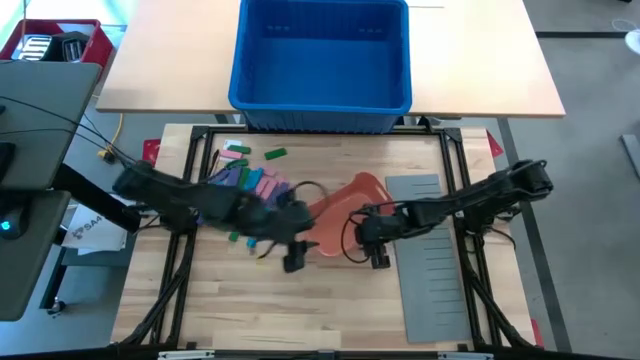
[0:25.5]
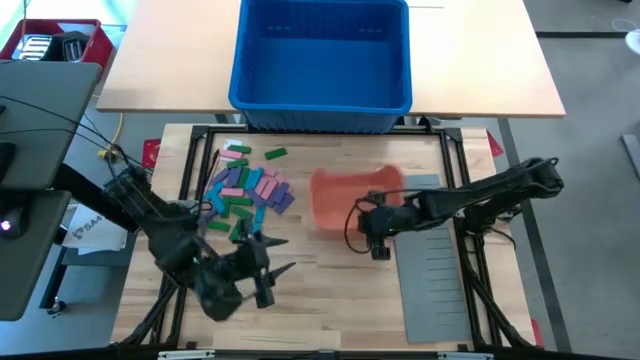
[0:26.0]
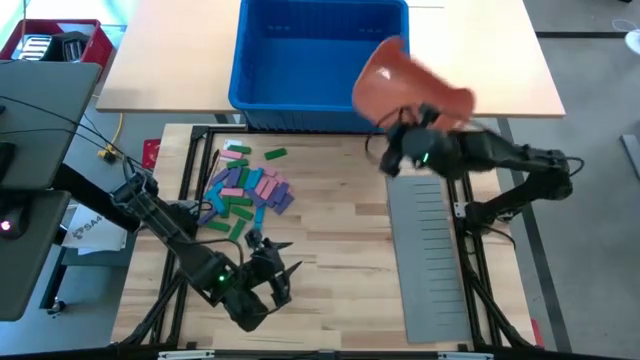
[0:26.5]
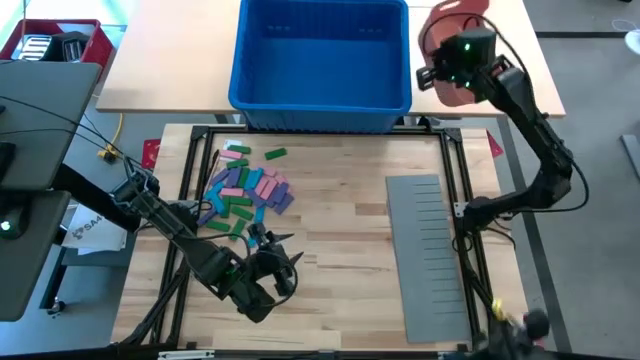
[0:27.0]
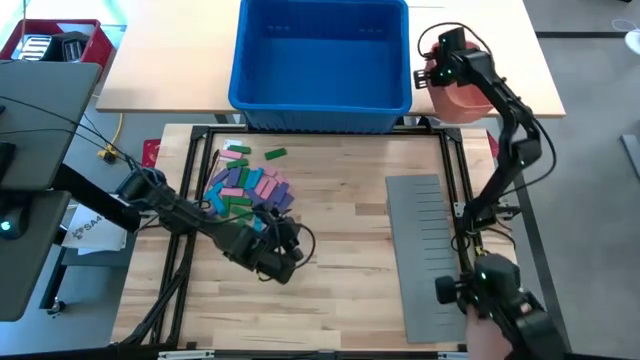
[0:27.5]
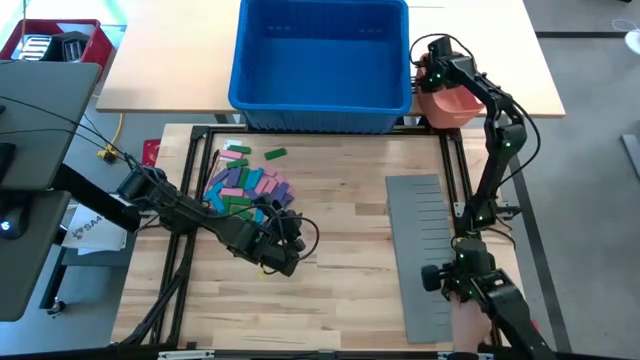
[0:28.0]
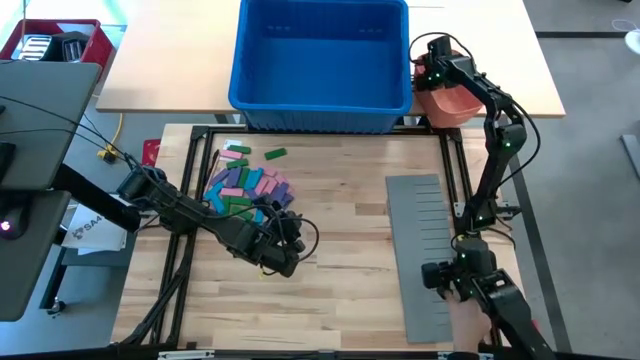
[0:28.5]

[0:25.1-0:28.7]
Task: Sort blocks
Move the orange bin to the other table

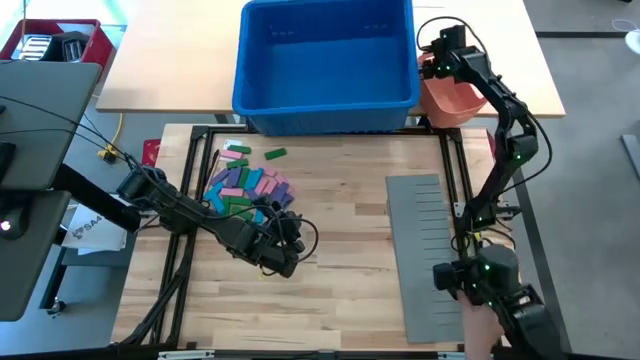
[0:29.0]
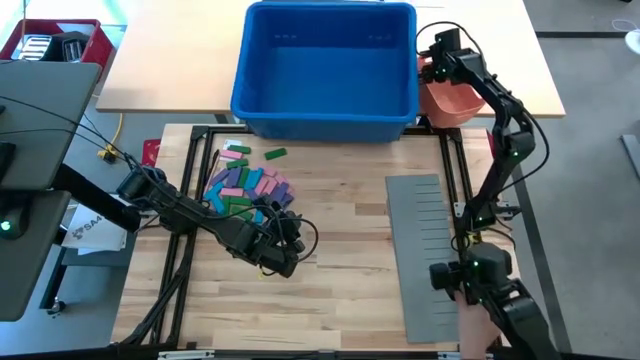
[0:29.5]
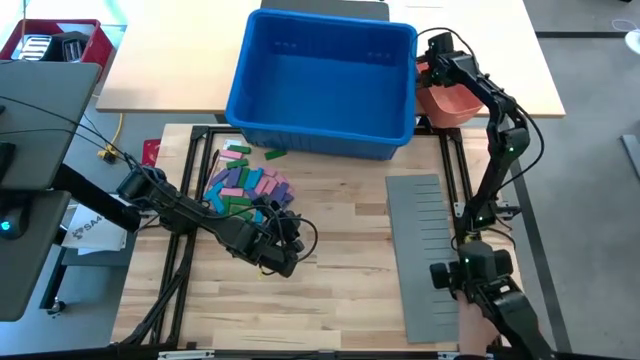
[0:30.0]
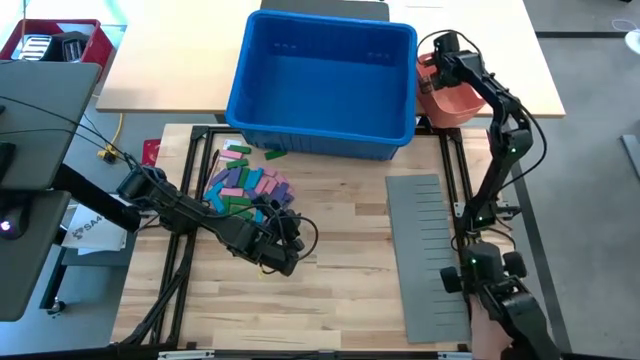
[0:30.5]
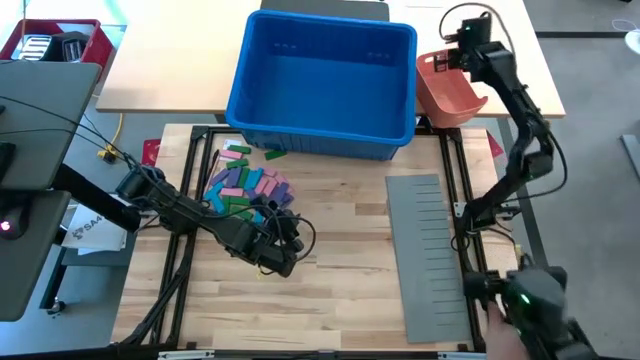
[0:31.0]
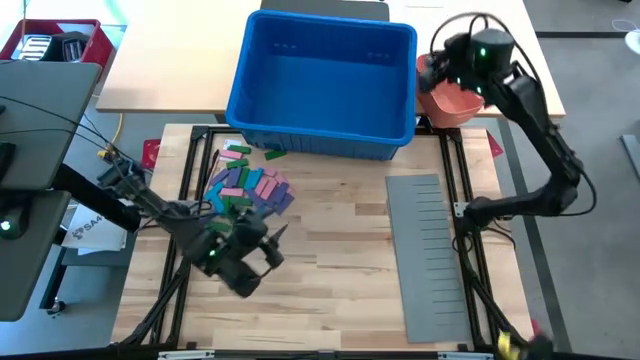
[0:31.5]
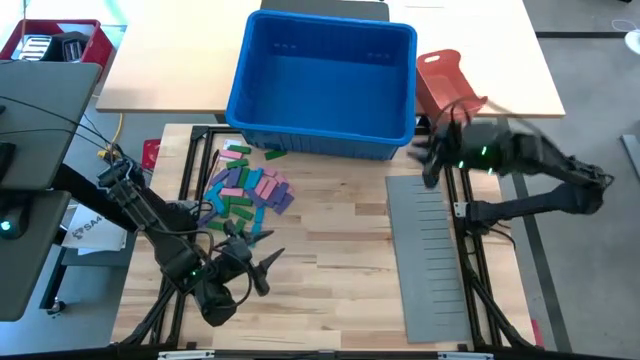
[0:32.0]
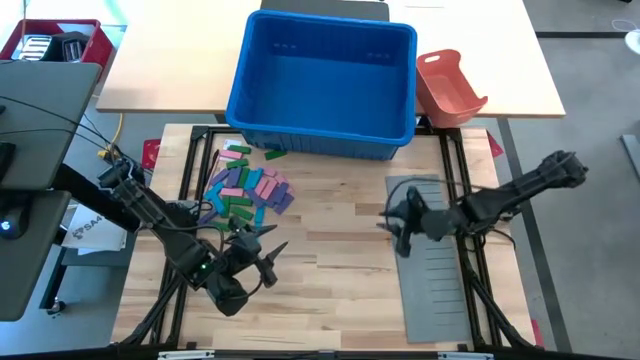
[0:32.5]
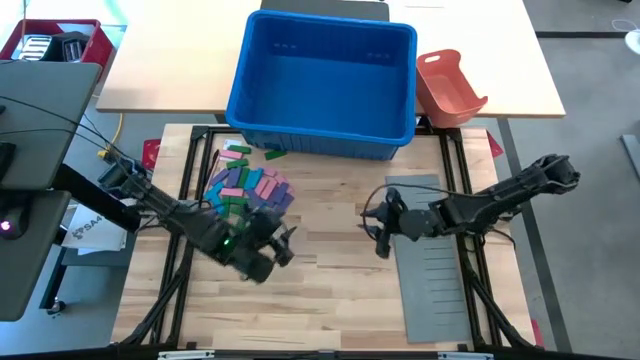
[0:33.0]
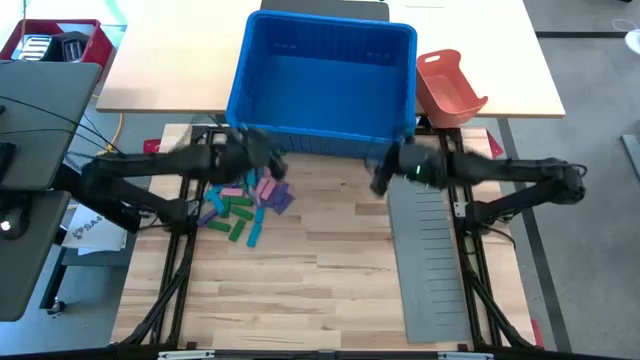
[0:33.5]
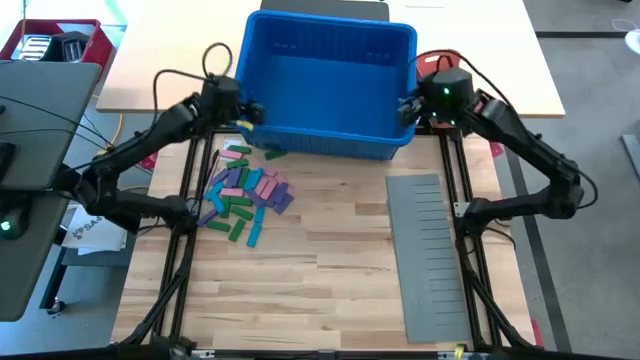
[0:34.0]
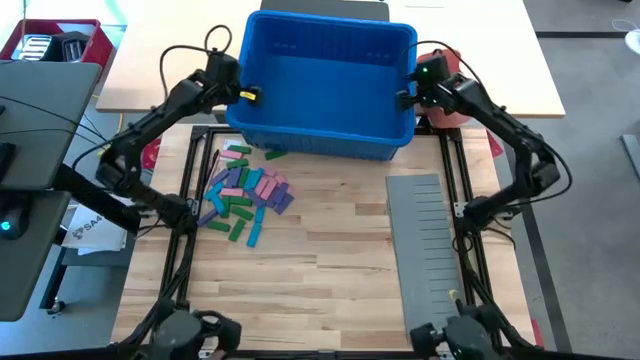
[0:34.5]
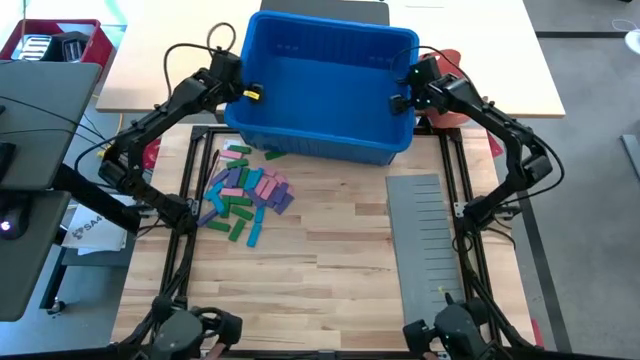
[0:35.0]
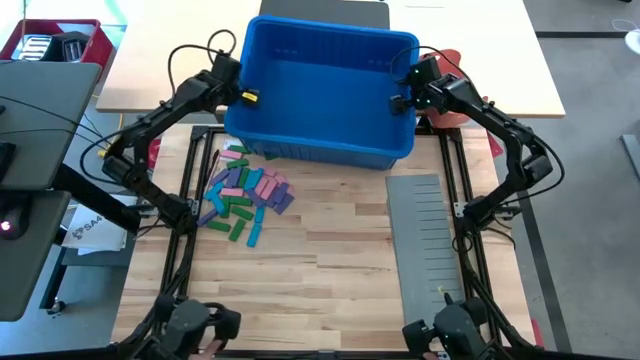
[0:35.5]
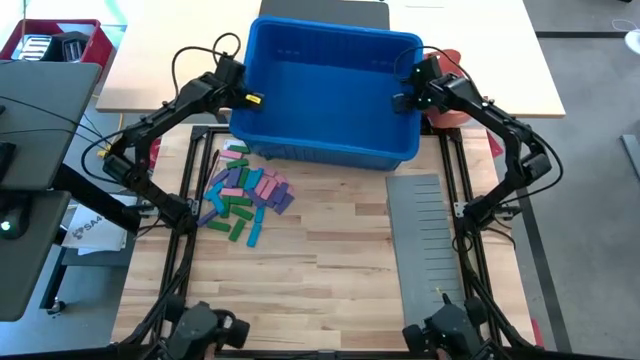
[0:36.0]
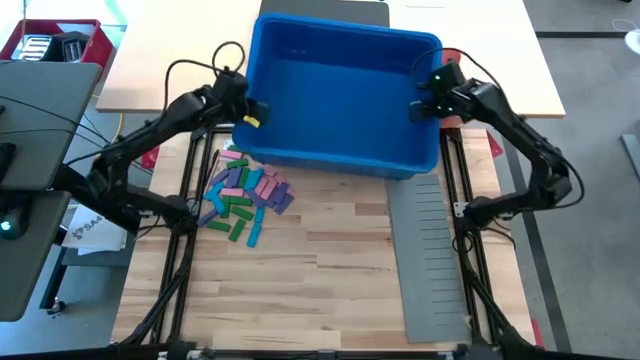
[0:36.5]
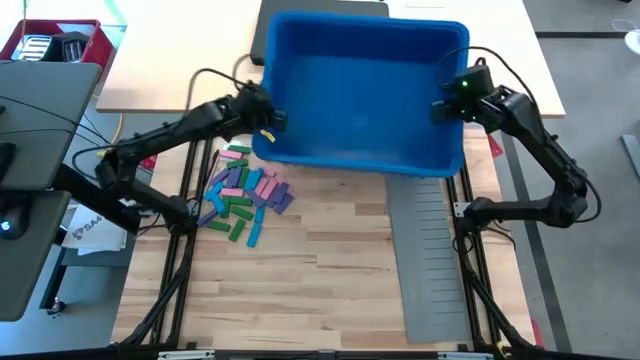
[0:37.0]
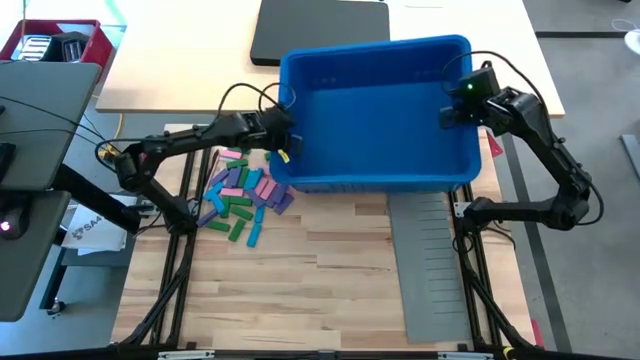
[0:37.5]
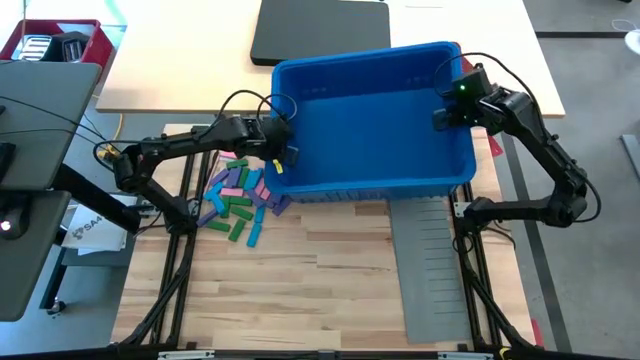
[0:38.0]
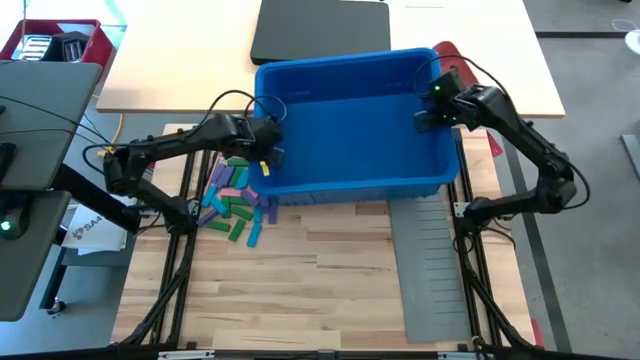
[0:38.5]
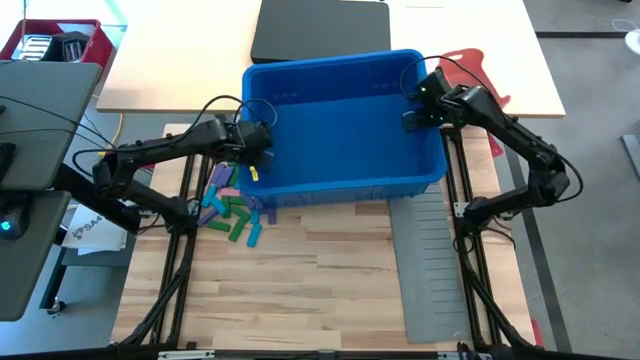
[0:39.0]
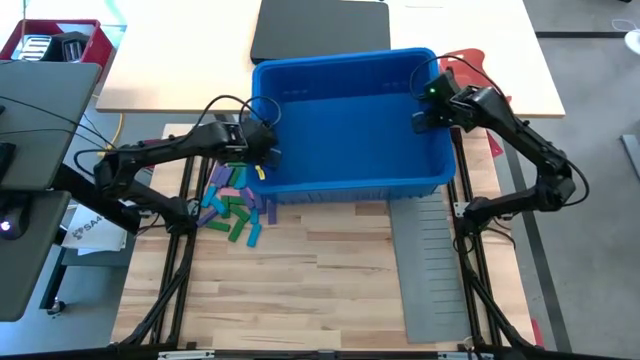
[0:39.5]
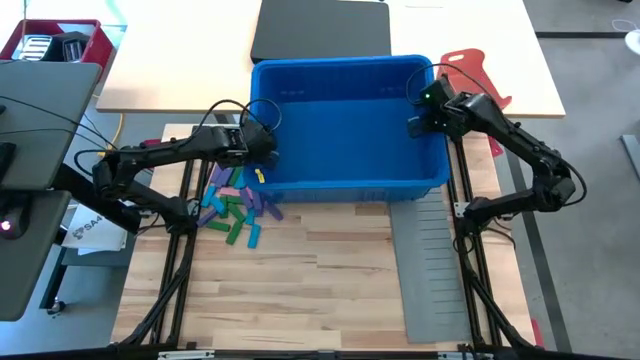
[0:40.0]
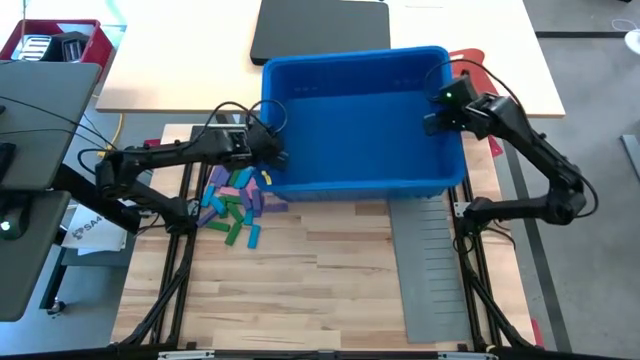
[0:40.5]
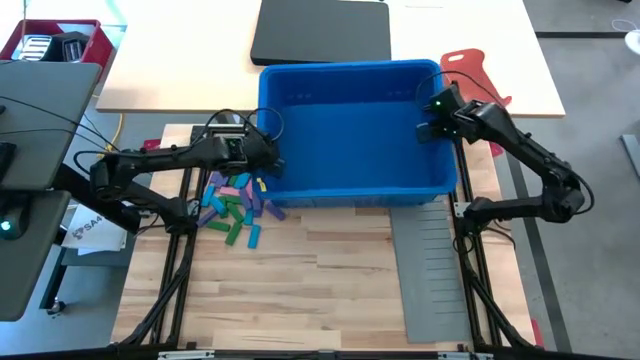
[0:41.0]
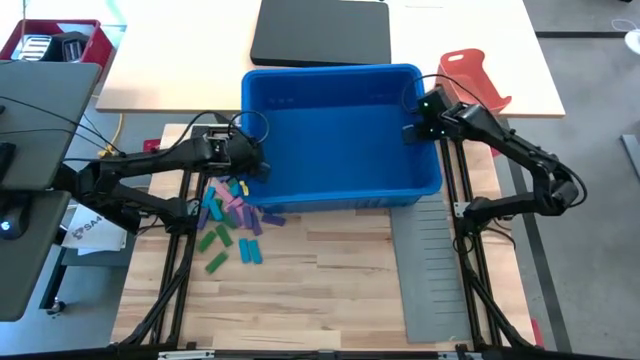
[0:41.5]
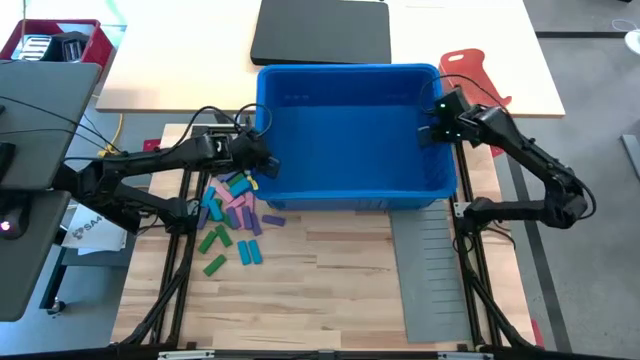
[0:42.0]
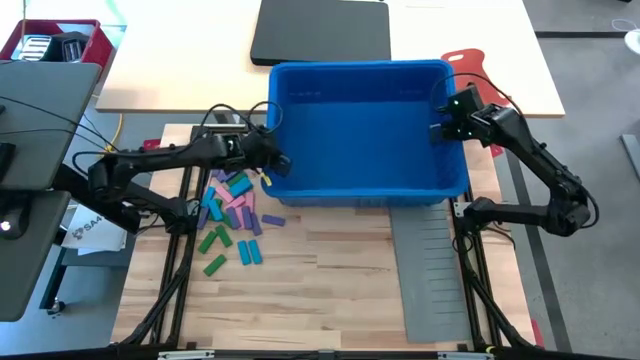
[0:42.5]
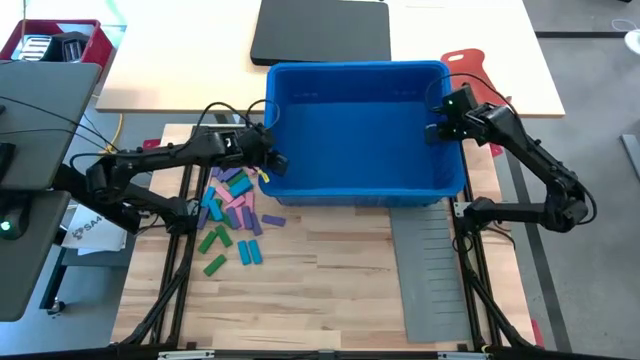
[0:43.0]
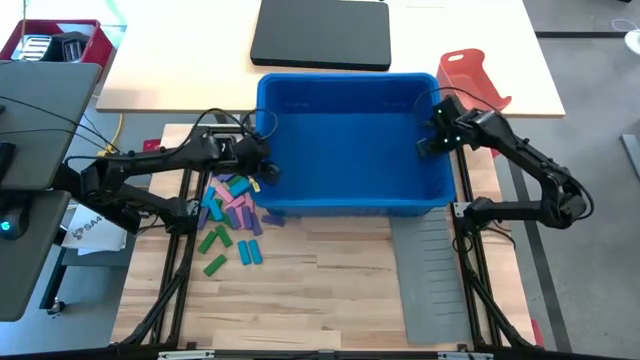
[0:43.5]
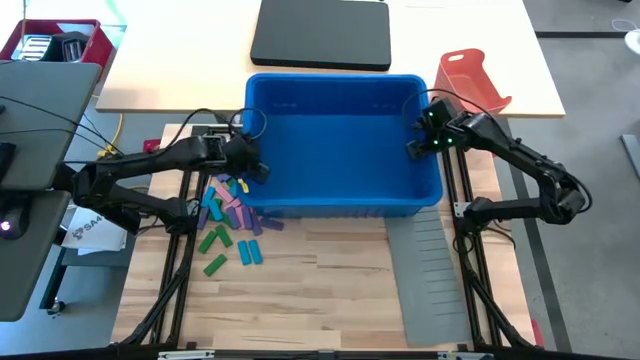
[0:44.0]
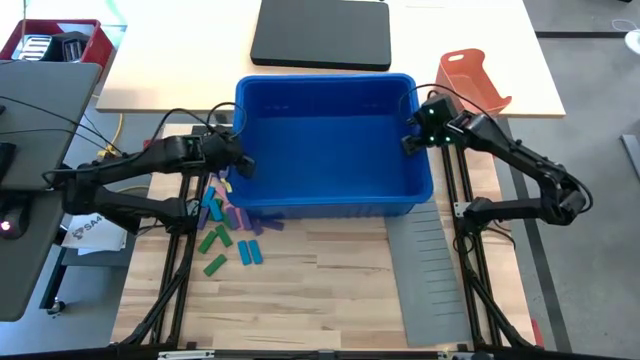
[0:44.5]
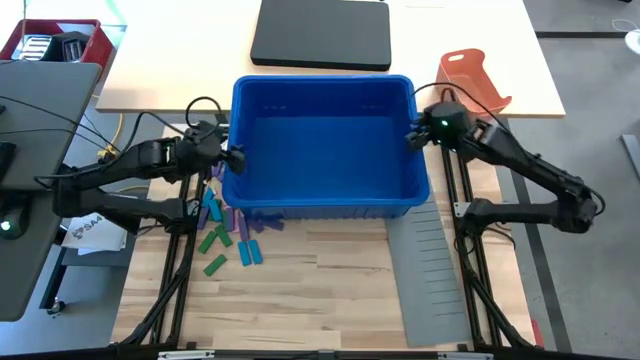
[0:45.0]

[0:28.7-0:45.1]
Adjust the blue bin
